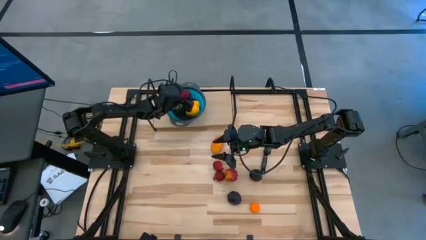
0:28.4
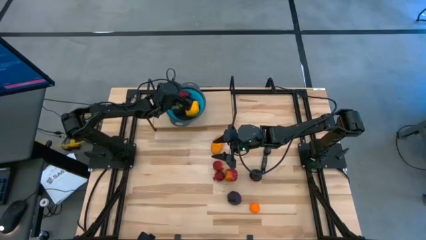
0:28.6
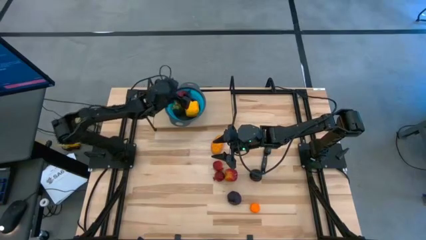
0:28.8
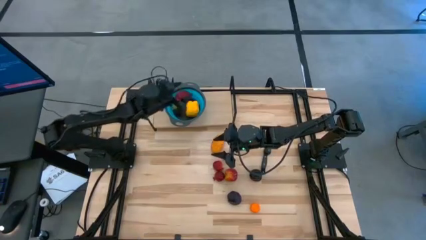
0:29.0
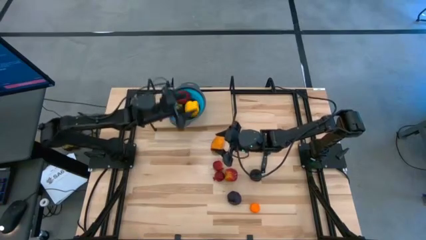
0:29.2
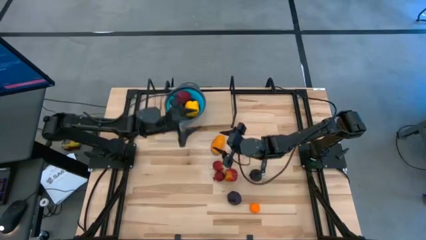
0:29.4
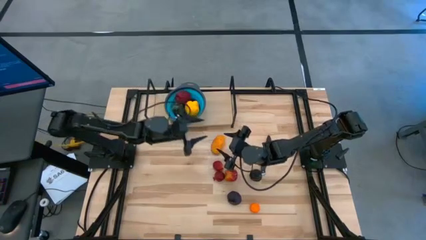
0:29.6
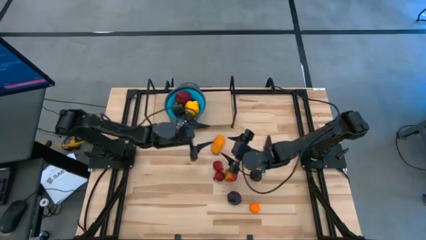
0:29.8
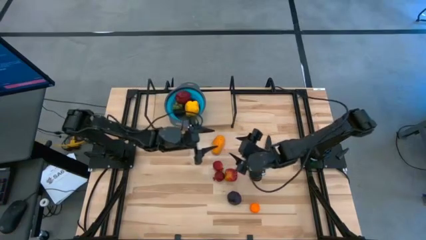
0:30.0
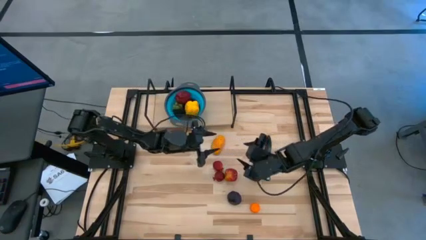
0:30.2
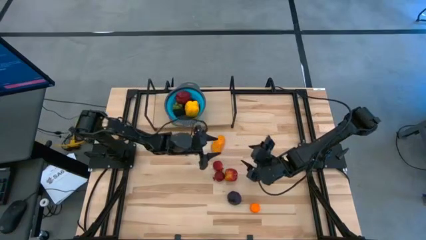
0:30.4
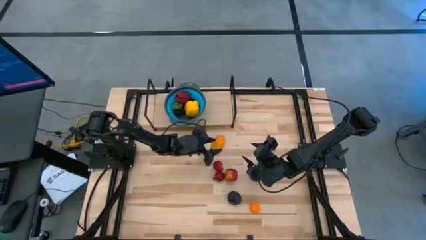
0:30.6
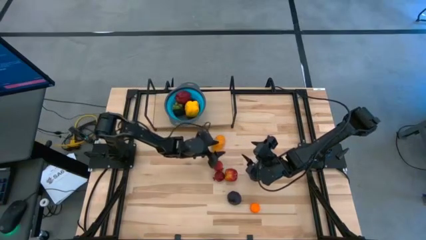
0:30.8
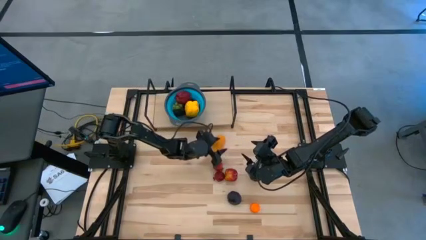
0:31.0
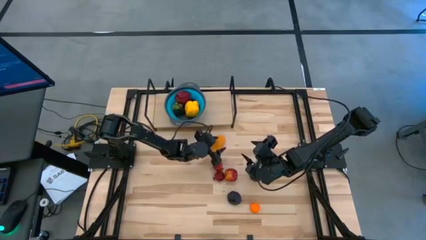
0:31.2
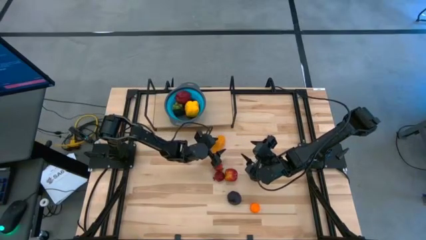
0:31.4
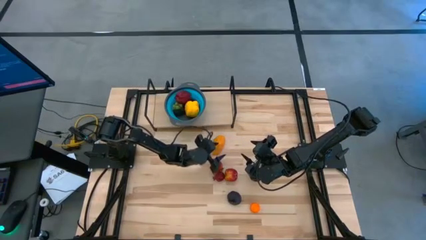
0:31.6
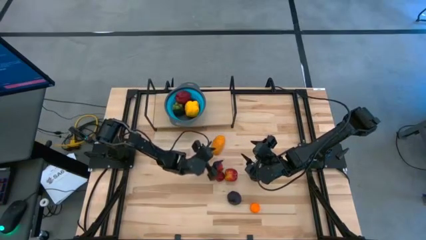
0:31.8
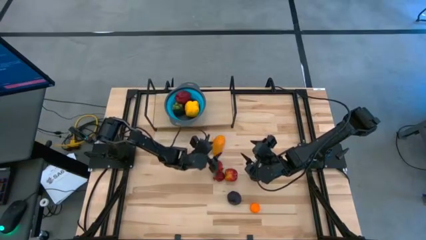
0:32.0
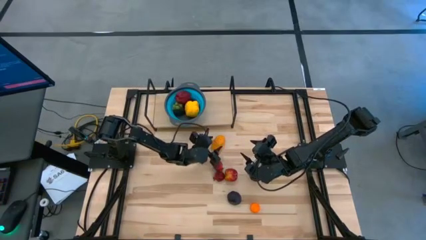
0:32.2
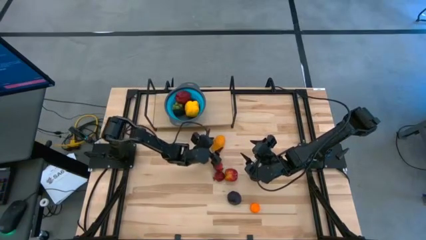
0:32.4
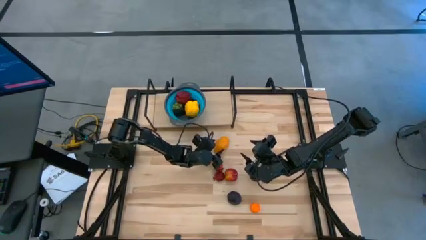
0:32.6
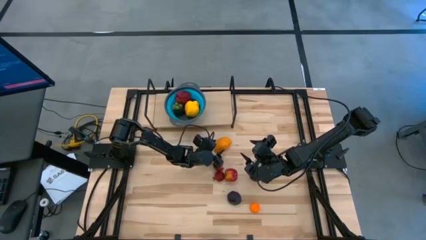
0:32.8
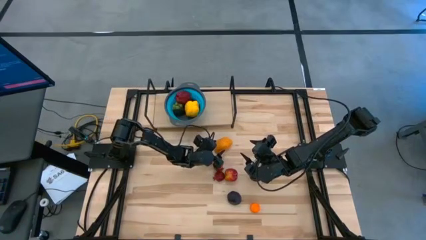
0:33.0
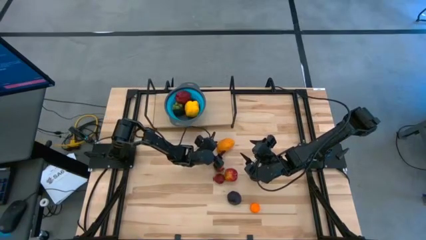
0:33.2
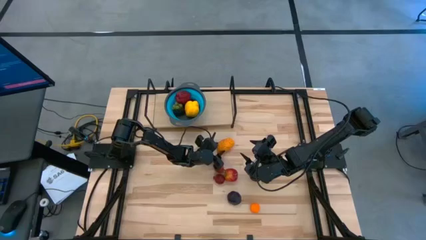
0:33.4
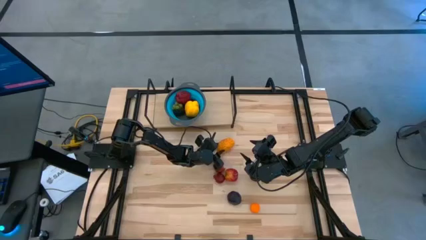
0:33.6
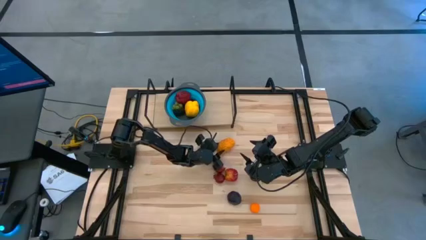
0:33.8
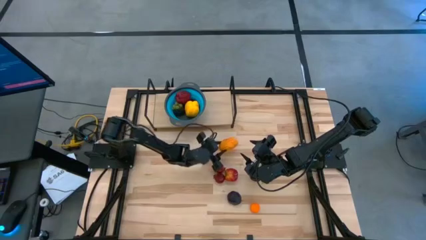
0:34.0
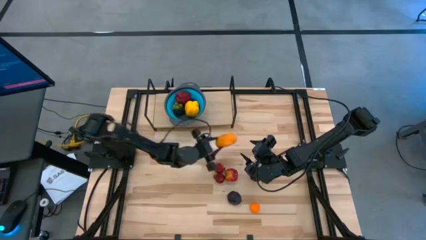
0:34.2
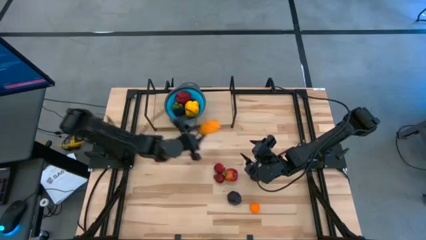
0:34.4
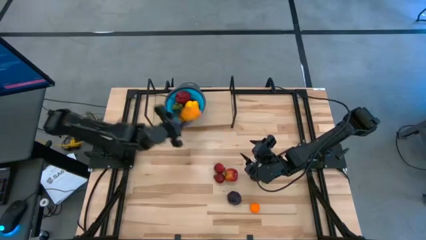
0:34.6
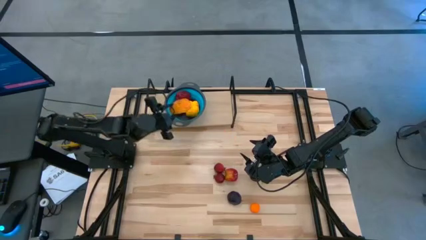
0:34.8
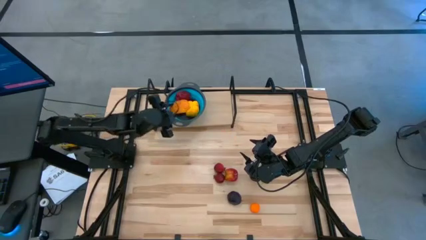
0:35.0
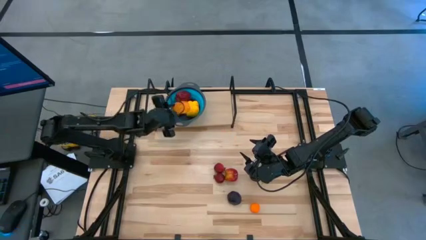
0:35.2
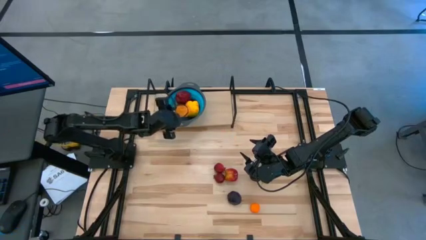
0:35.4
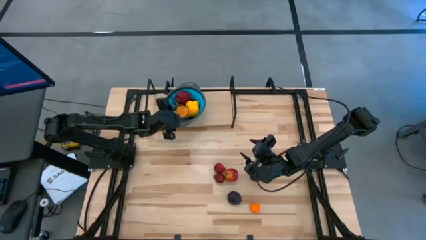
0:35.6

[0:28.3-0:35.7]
Task: Pick & Place Fruit
Put the mango into the blue strainer bowl on the shelf

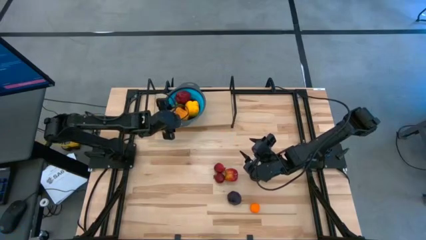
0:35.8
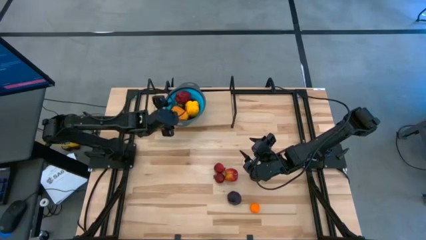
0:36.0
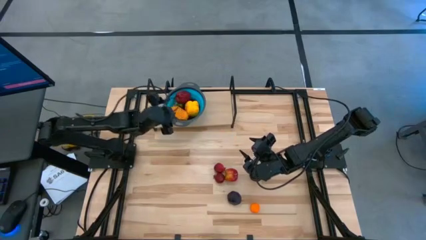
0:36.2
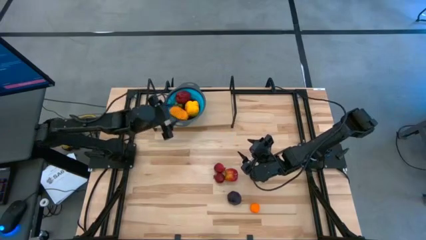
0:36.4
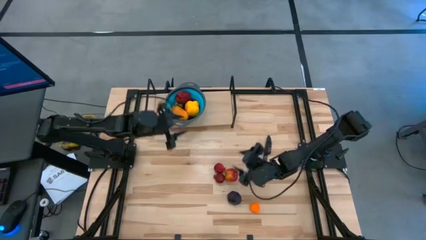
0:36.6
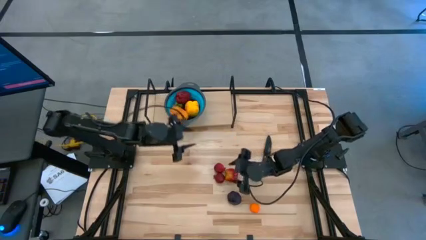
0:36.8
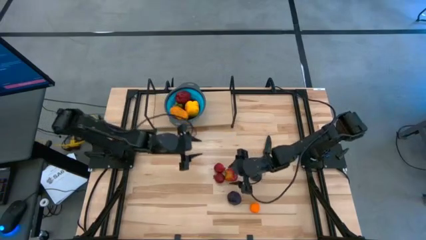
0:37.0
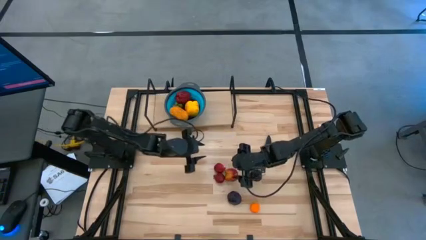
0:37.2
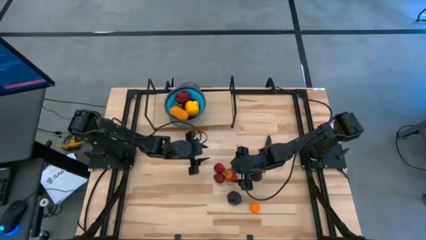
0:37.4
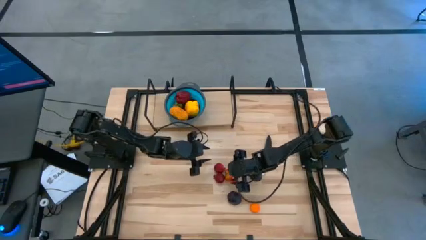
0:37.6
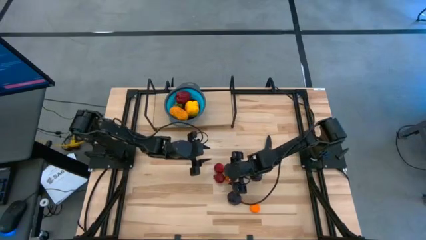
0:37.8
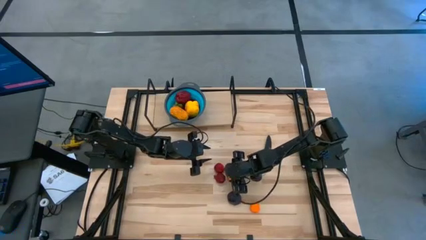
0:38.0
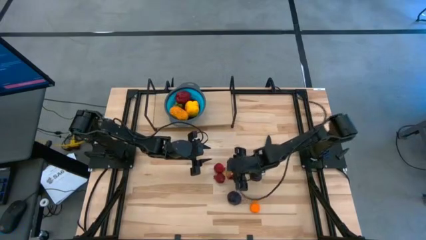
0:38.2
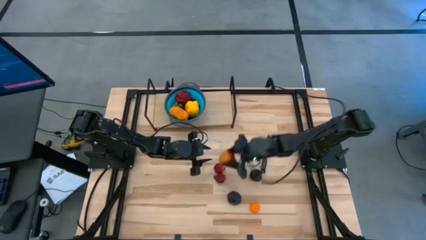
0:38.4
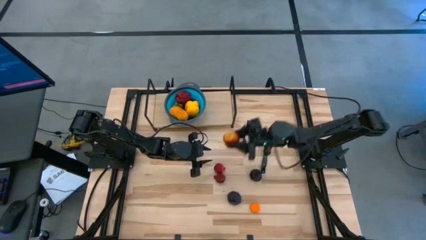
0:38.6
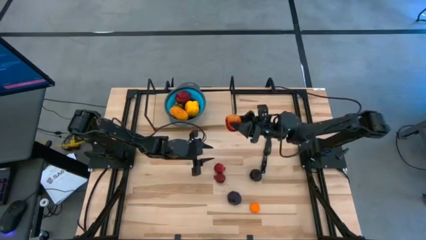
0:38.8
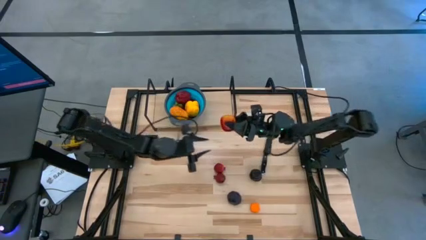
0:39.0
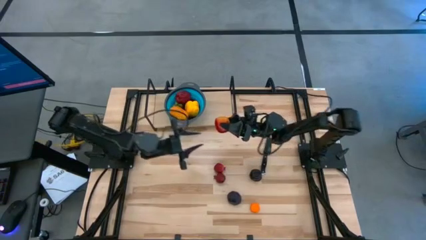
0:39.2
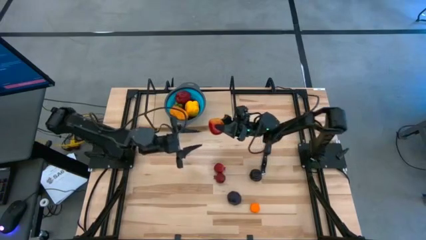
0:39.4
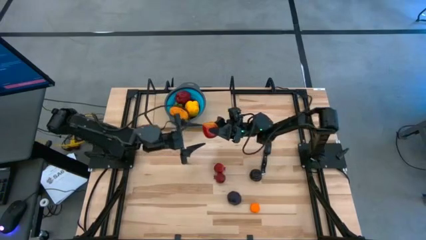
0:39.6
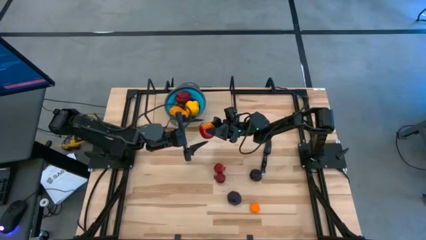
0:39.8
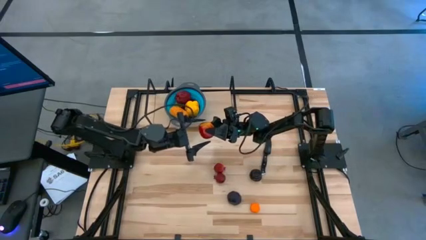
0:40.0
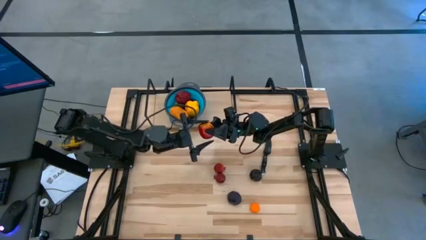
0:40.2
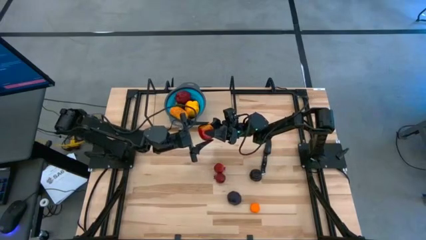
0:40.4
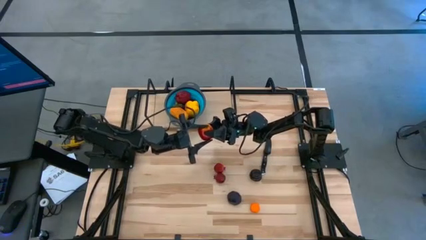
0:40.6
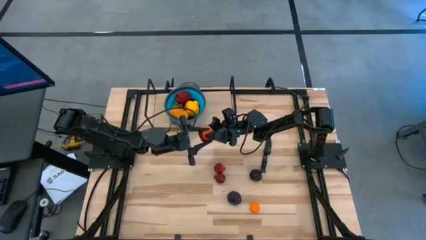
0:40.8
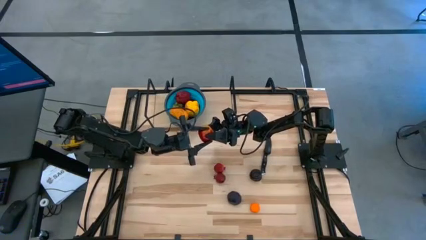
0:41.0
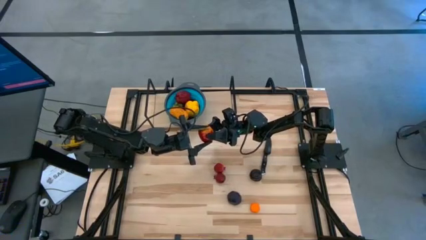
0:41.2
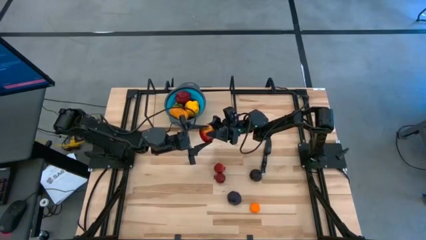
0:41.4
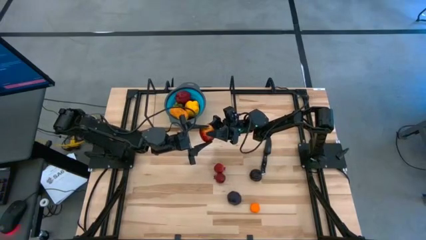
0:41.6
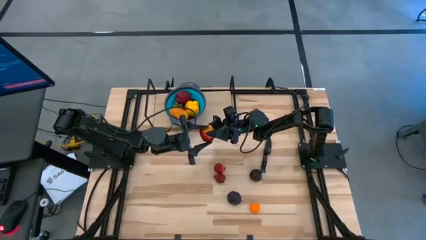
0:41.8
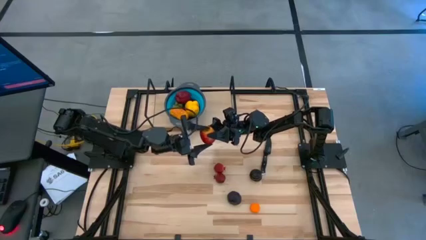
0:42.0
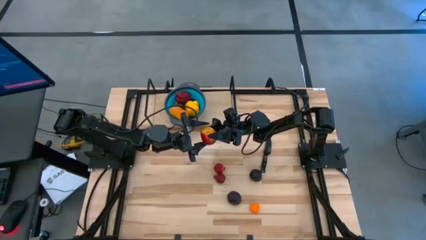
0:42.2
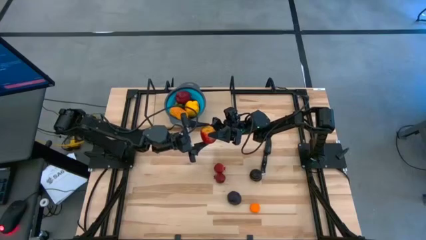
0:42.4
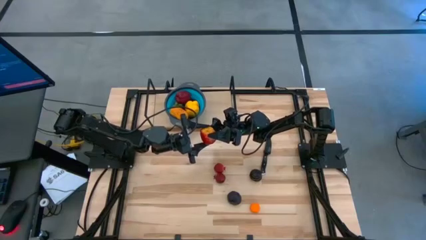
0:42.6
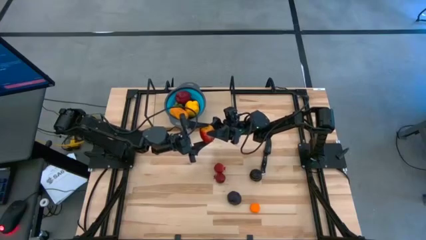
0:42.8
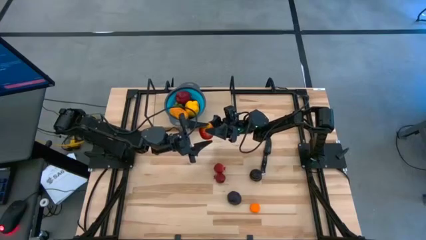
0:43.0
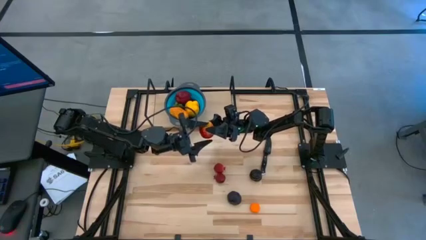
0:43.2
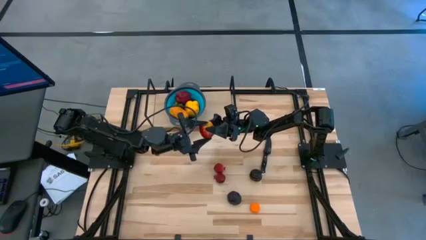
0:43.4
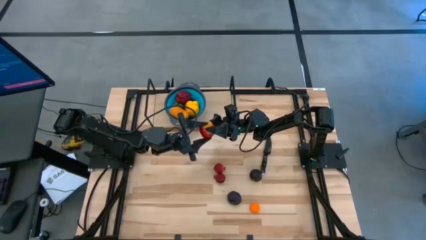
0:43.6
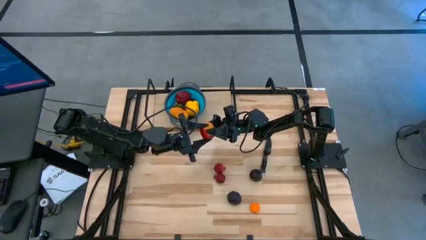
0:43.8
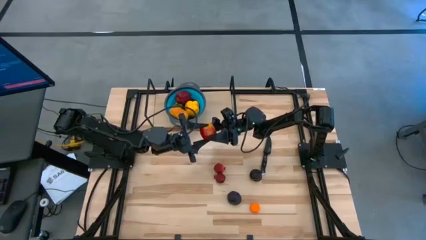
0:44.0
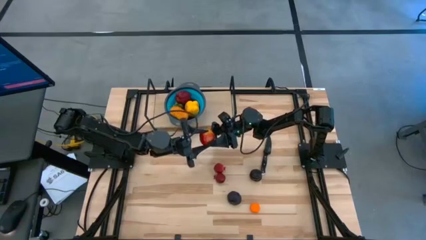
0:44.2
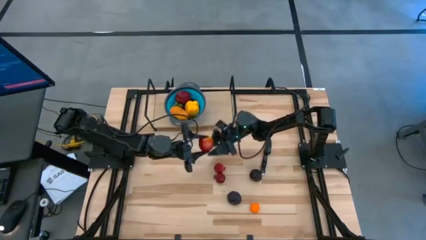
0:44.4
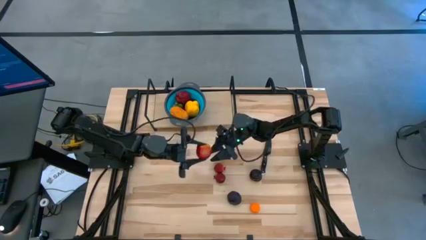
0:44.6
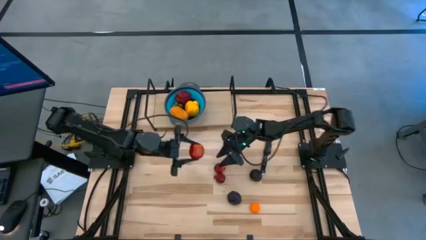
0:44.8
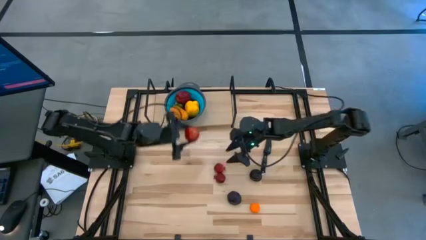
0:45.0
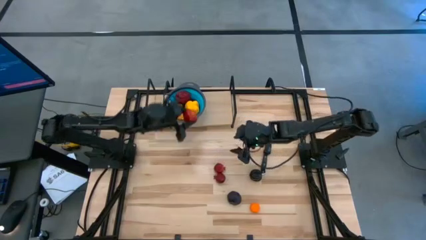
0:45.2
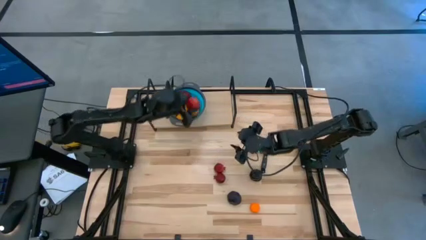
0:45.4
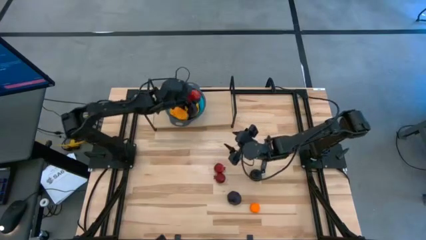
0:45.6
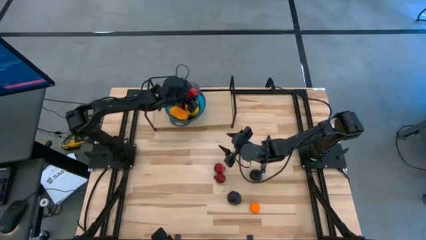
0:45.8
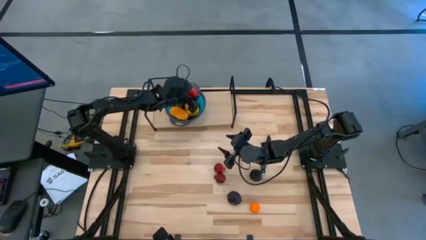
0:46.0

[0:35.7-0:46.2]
Put the peach into the blue strainer bowl on the shelf
